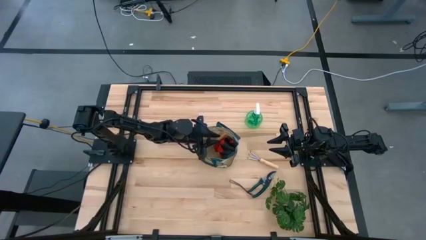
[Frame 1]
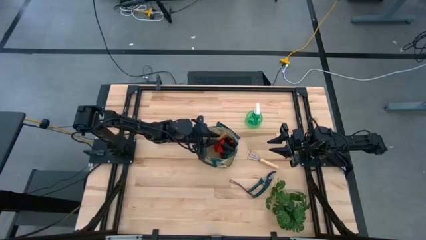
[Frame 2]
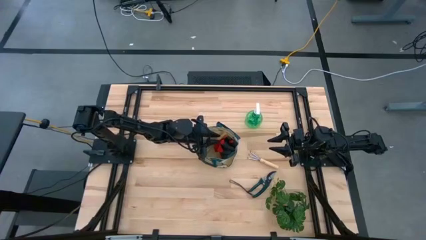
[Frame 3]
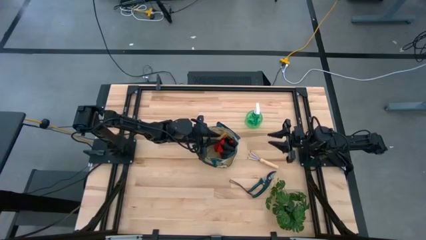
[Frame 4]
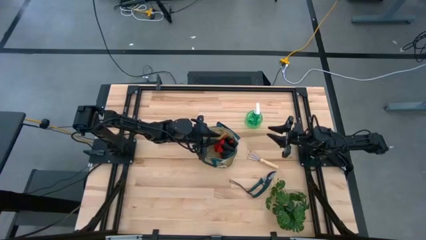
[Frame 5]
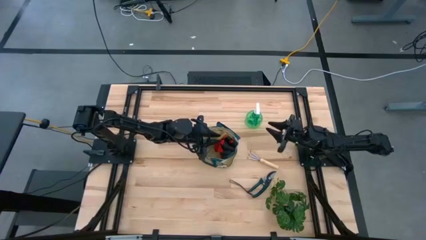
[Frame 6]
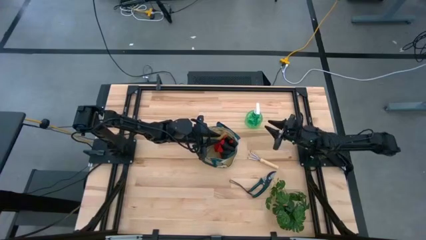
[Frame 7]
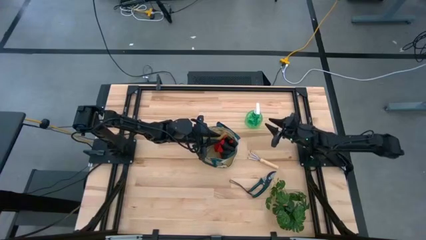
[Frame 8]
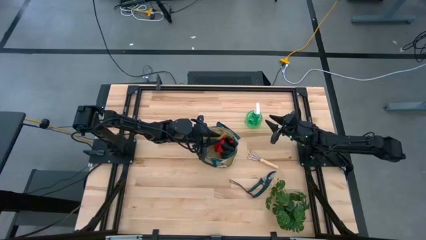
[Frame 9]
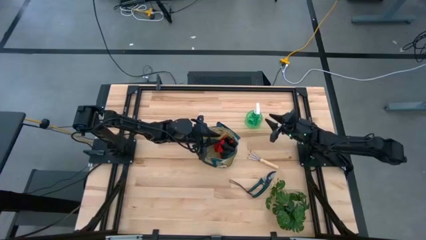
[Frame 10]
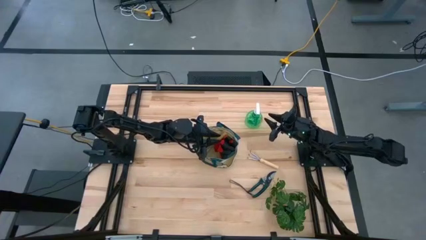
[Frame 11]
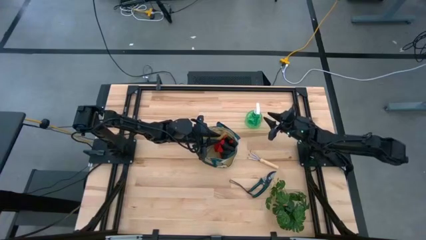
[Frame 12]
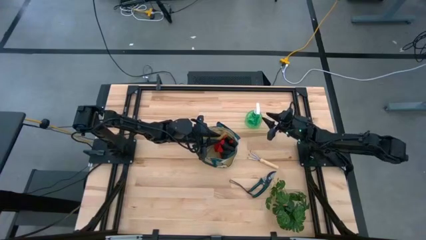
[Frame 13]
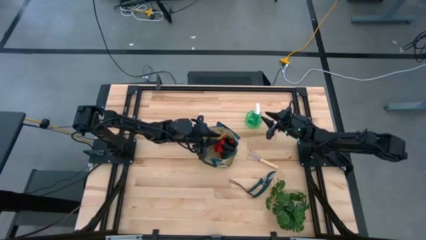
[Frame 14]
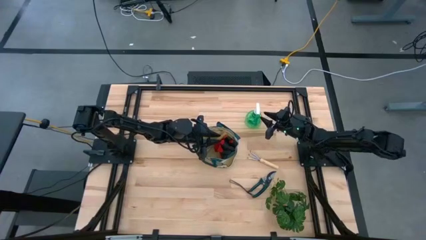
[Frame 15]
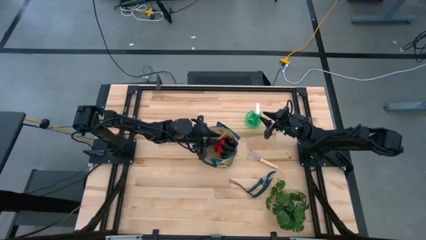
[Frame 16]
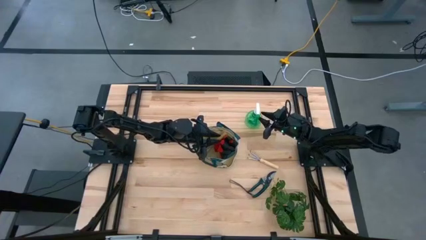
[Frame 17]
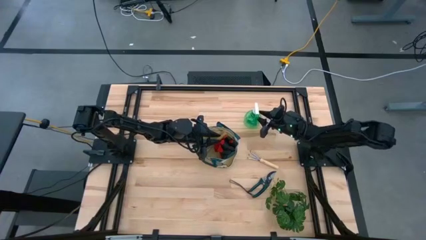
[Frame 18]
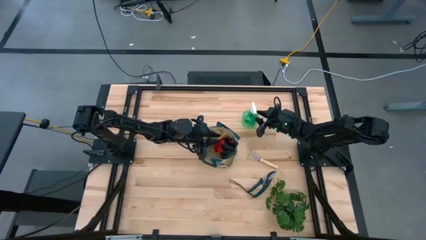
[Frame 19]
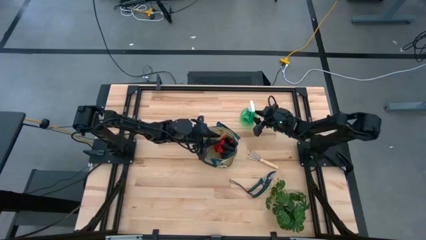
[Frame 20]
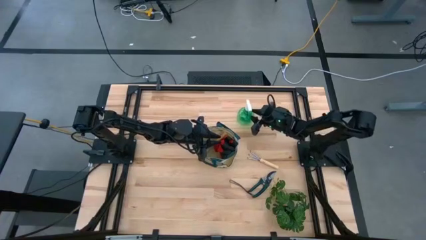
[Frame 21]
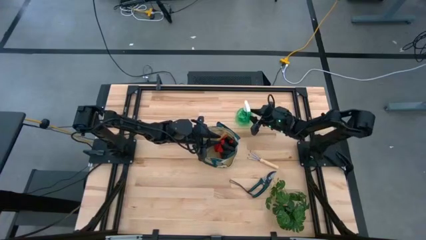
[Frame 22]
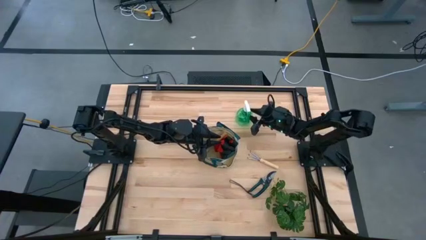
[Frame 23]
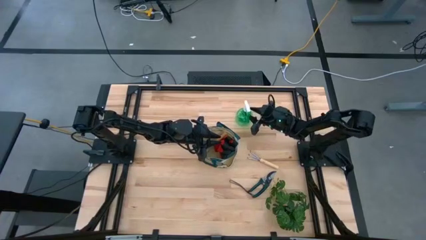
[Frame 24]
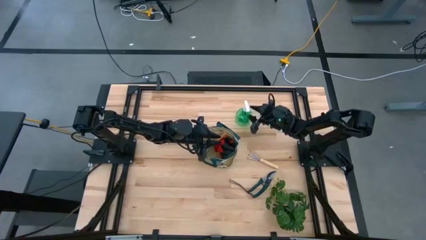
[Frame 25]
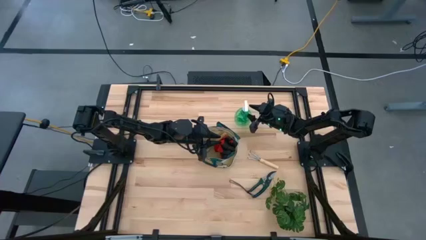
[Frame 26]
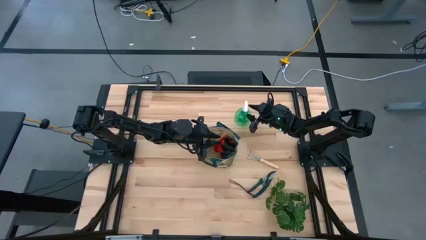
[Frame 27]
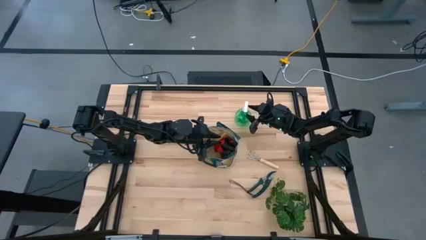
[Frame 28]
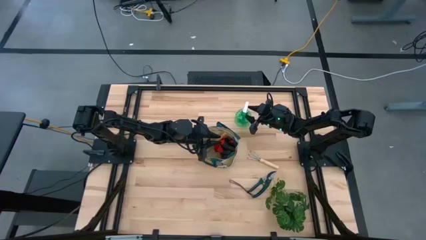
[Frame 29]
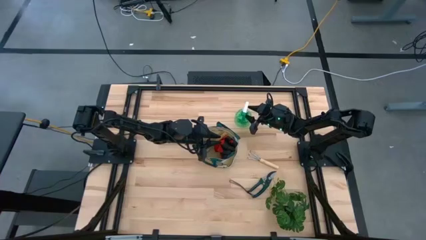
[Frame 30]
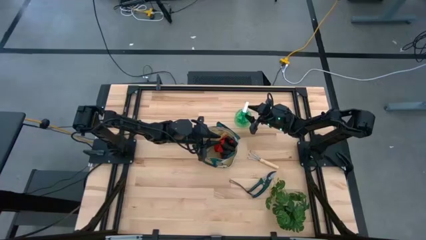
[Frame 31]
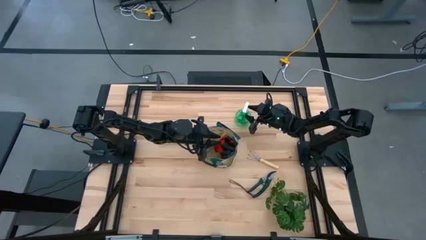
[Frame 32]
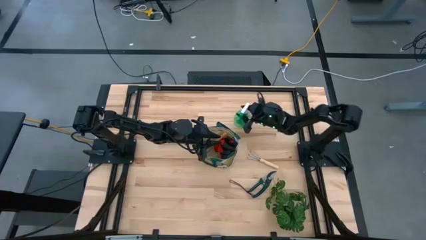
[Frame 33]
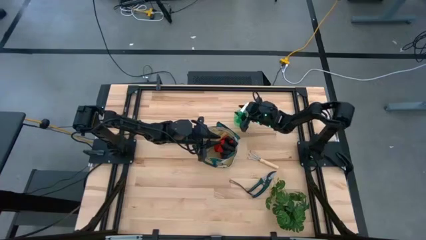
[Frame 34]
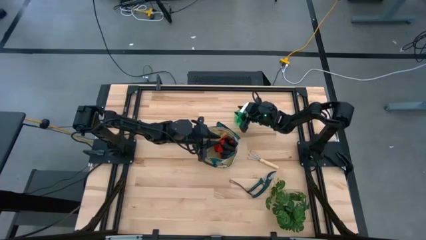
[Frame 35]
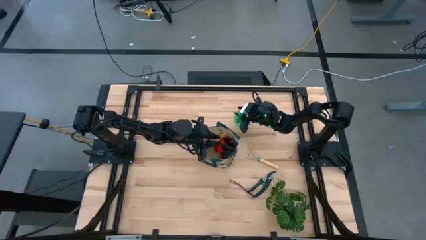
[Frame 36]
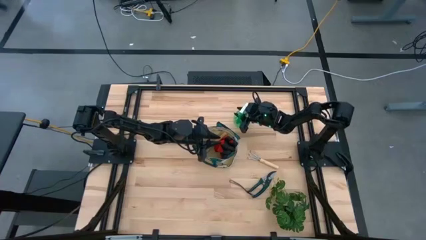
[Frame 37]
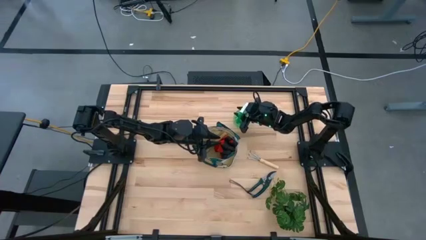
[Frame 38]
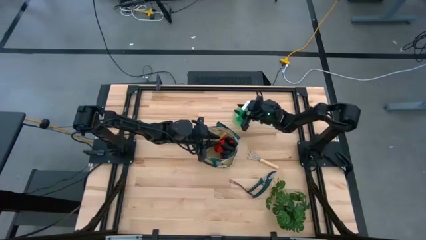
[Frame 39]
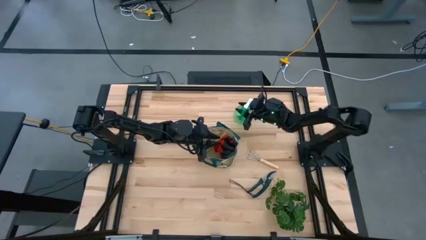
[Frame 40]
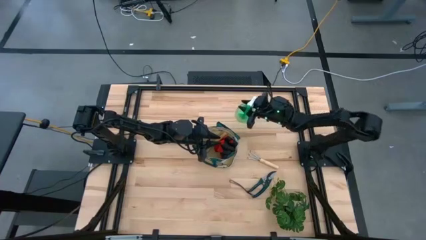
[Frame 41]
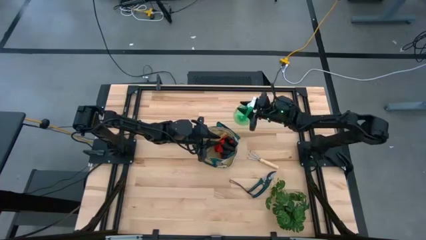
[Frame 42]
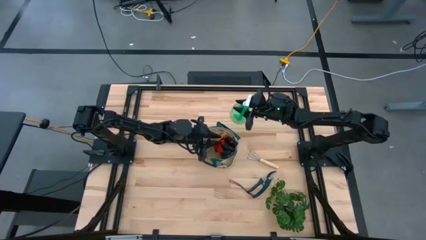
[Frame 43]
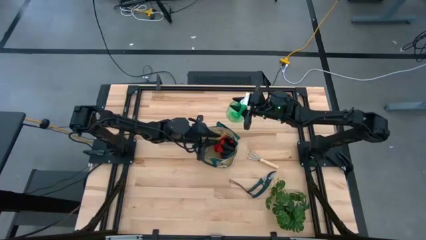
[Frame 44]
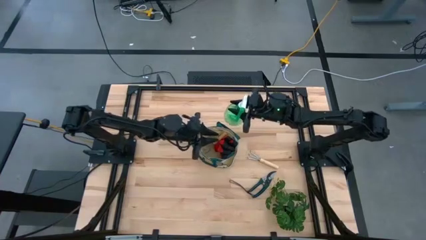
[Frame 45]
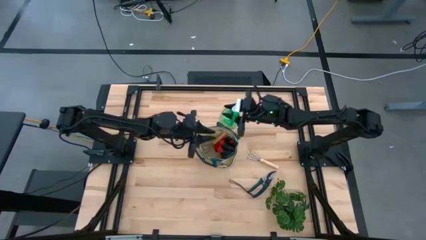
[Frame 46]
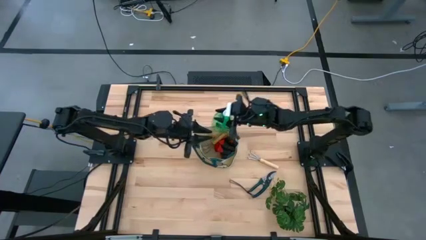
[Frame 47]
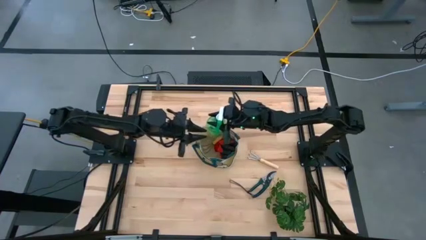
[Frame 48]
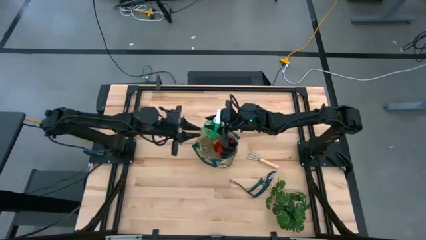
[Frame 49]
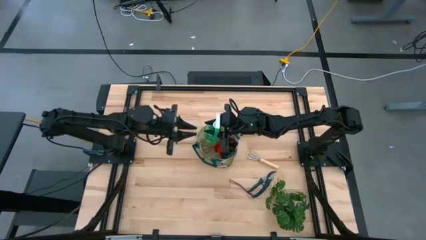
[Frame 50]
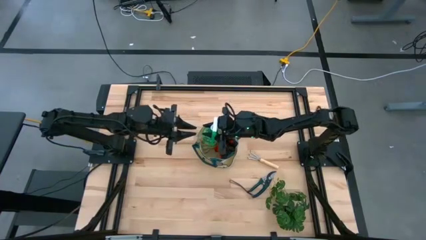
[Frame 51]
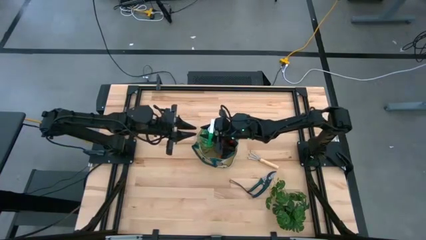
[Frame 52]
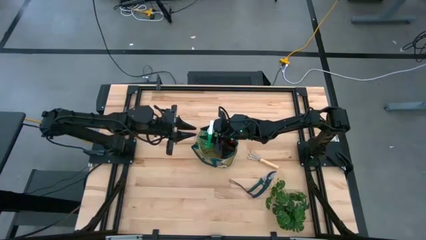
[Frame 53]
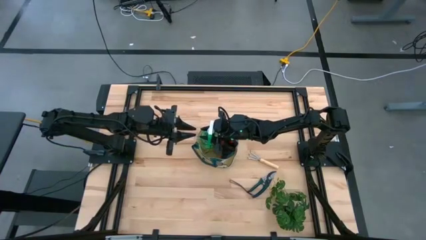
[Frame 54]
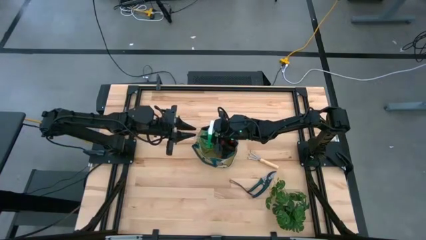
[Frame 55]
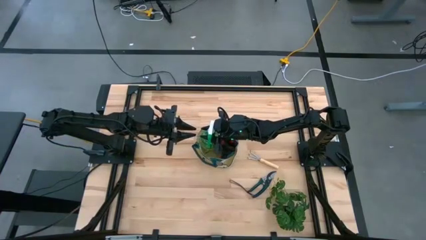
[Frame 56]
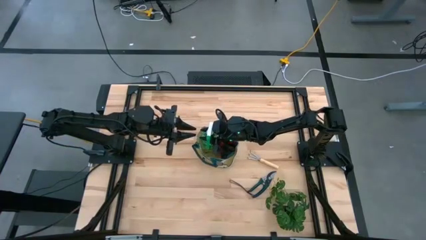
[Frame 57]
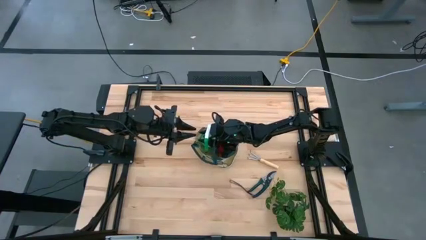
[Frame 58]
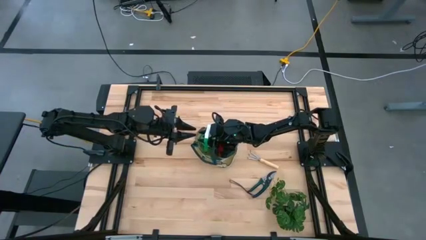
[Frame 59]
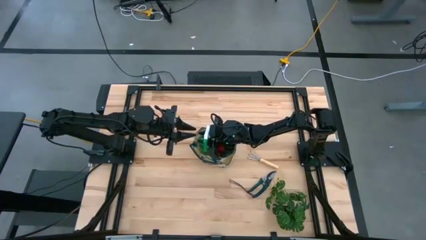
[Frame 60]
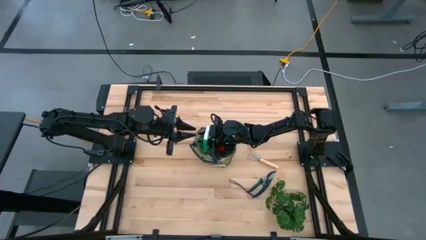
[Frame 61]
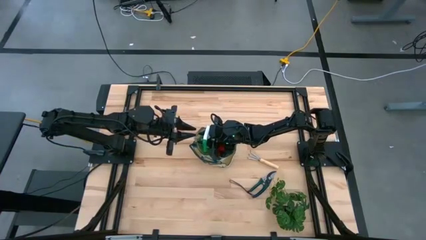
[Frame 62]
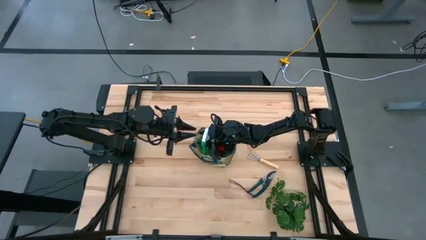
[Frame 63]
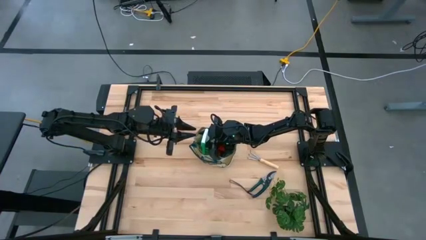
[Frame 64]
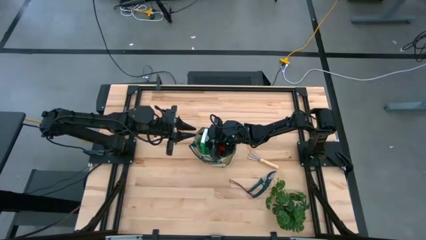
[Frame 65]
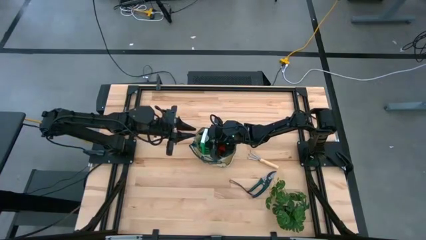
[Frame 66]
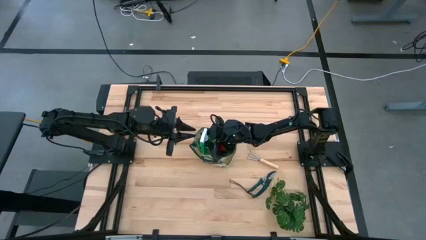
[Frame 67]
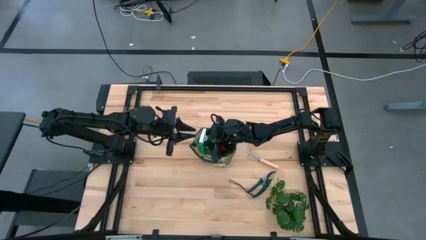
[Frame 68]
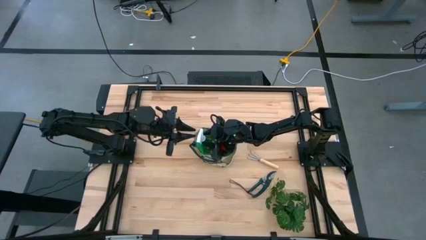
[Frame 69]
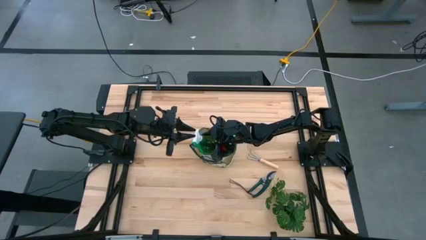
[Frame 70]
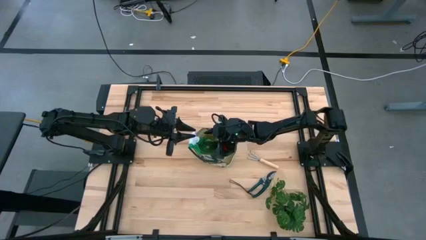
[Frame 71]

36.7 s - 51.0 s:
Task: Pick & Place Garden tools in Gardening bag
Put the green spray bottle into the green gardening bag
